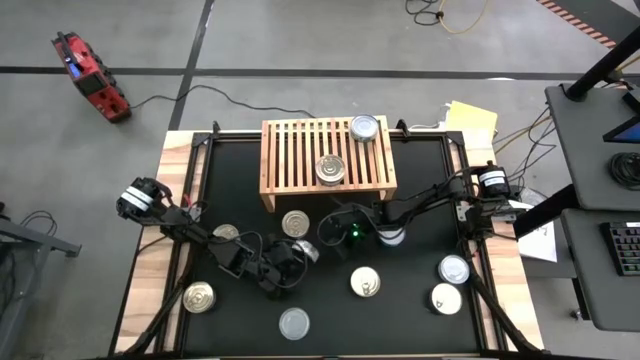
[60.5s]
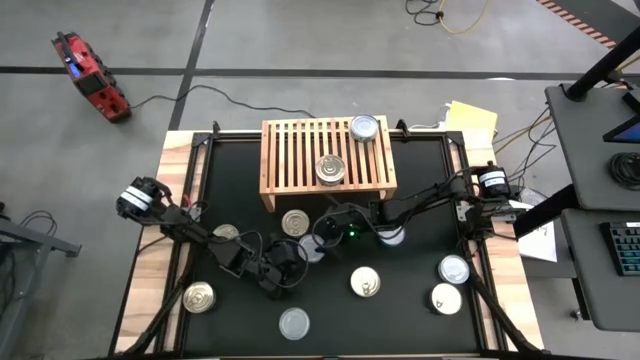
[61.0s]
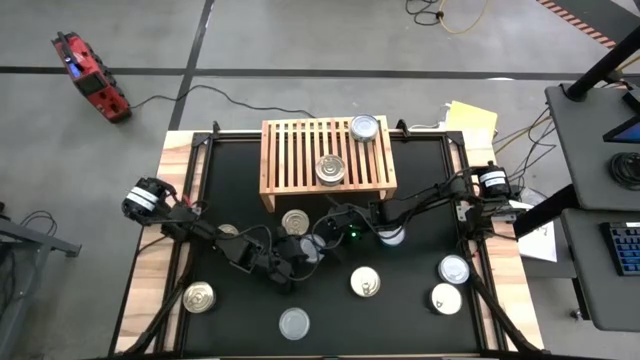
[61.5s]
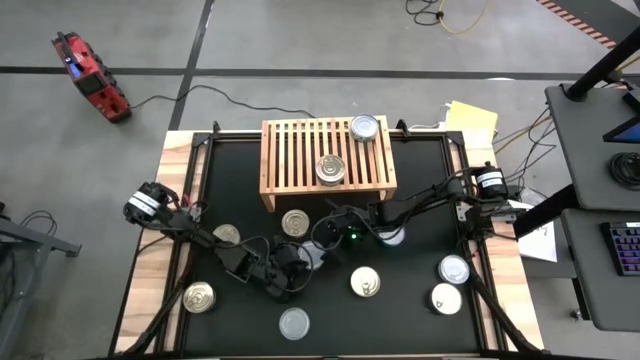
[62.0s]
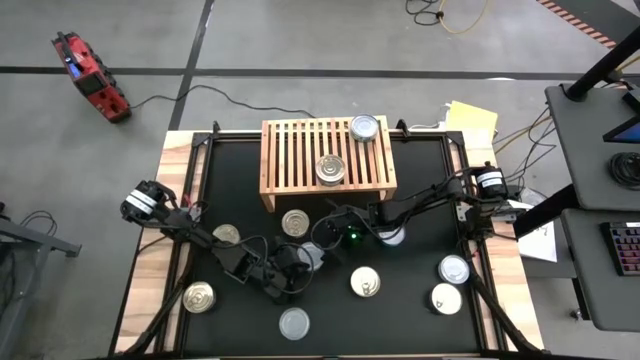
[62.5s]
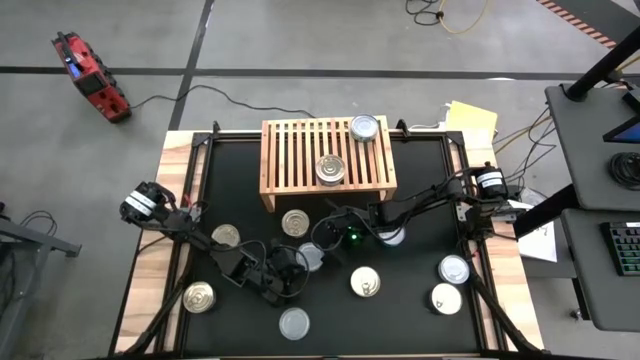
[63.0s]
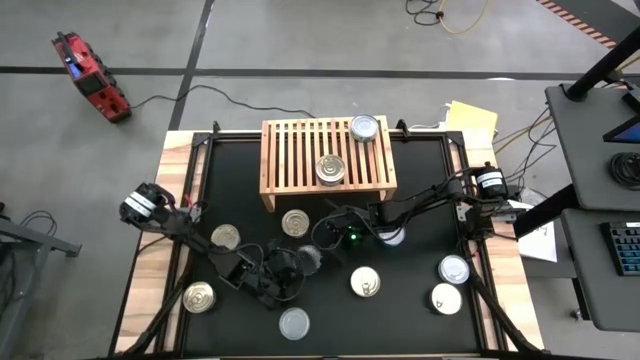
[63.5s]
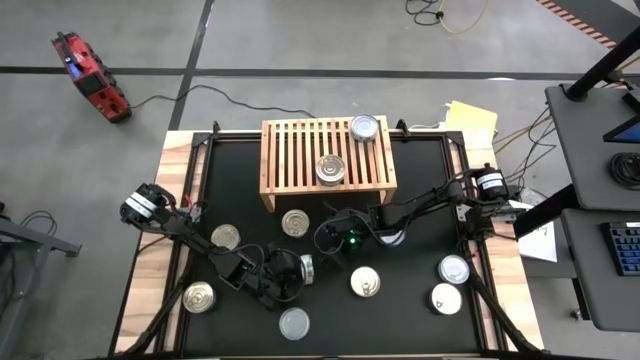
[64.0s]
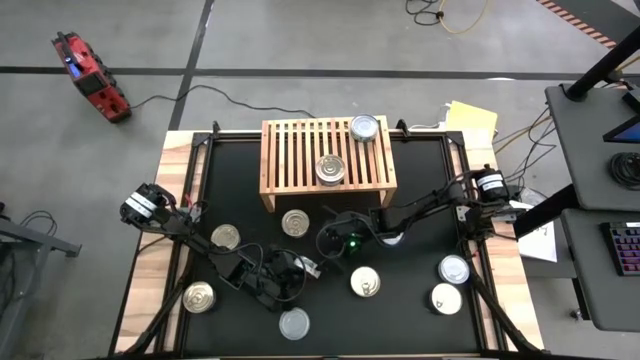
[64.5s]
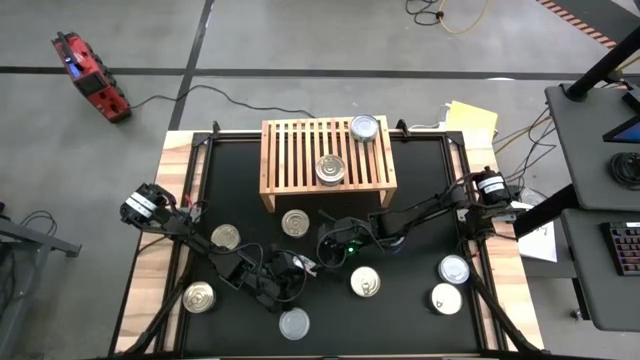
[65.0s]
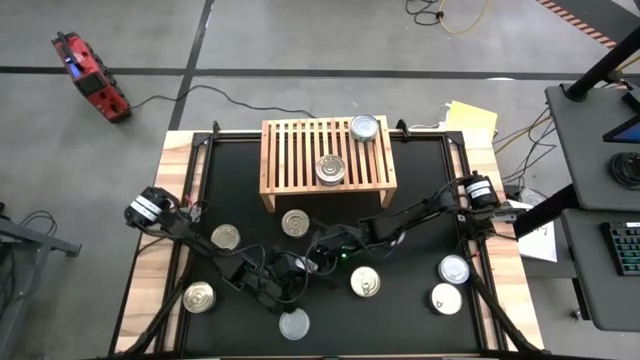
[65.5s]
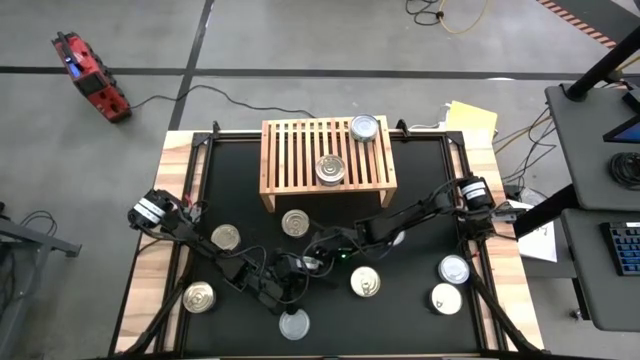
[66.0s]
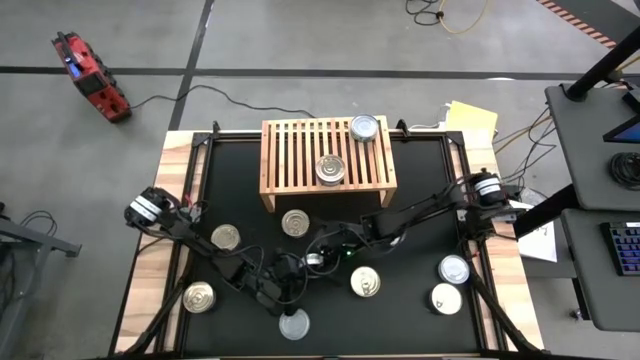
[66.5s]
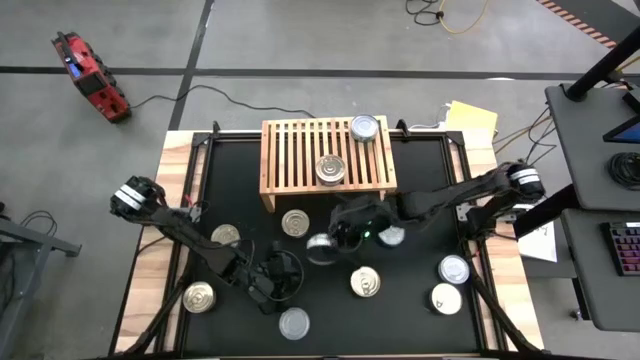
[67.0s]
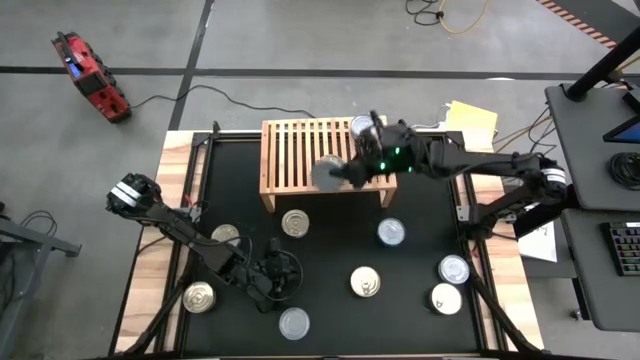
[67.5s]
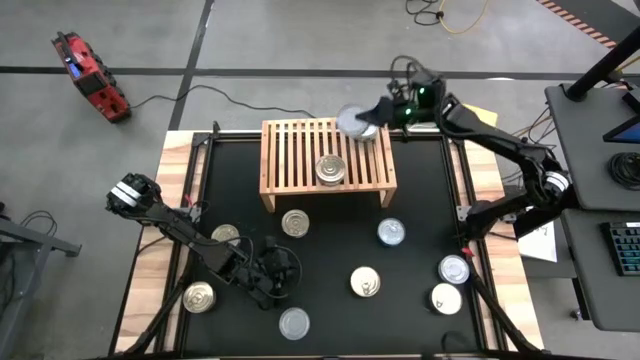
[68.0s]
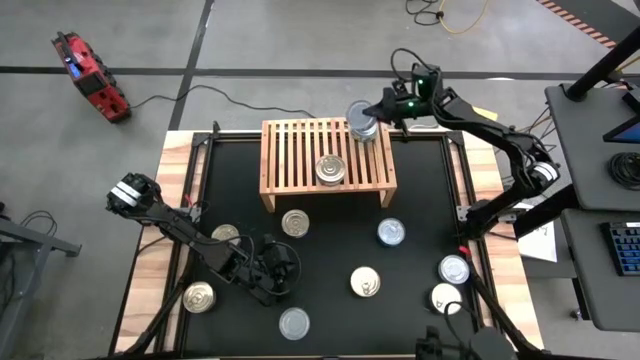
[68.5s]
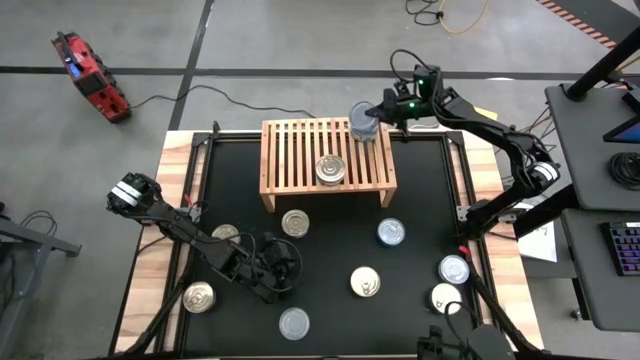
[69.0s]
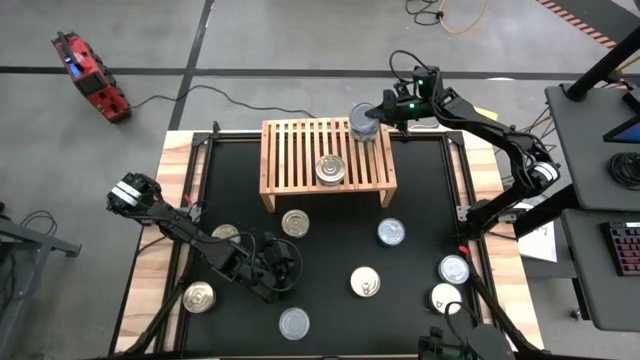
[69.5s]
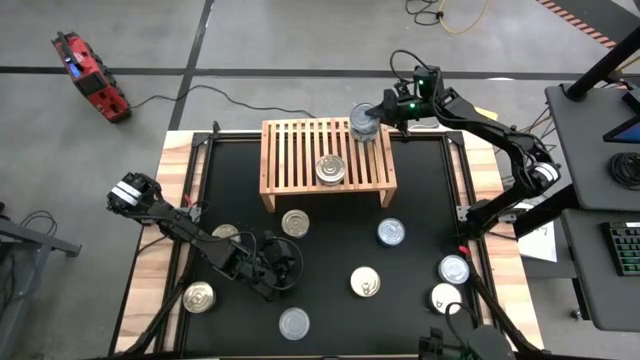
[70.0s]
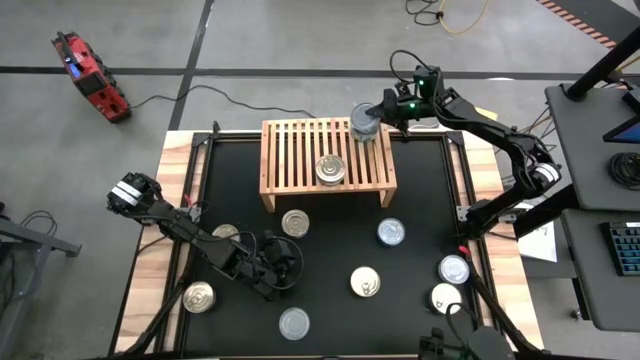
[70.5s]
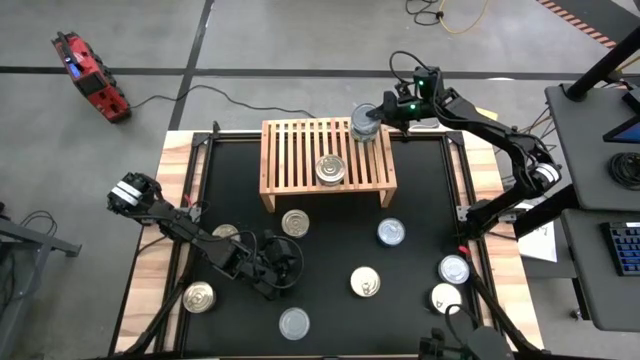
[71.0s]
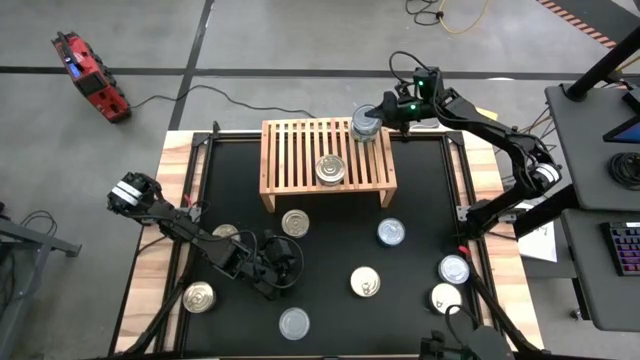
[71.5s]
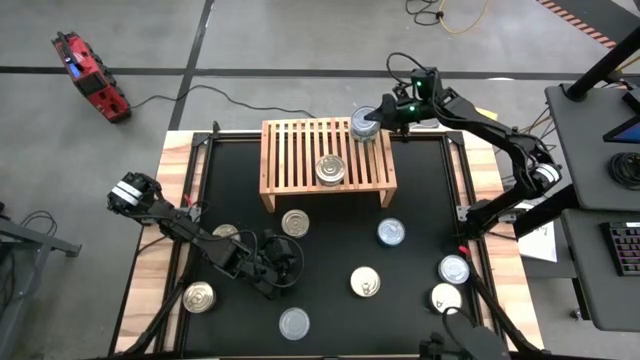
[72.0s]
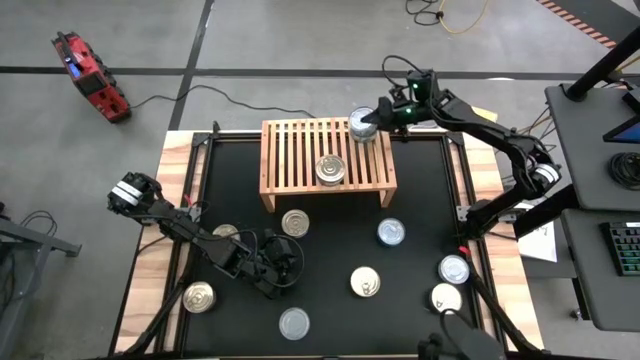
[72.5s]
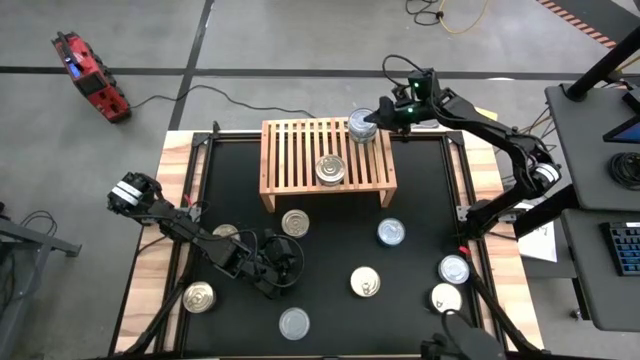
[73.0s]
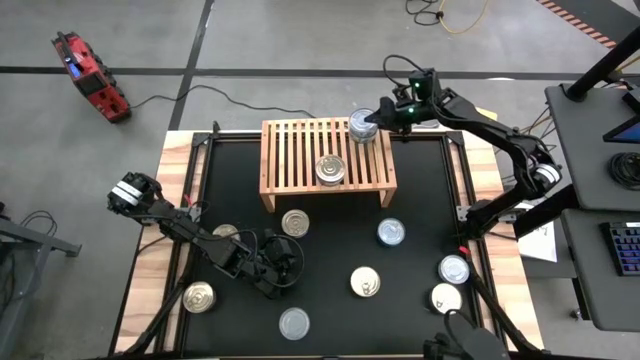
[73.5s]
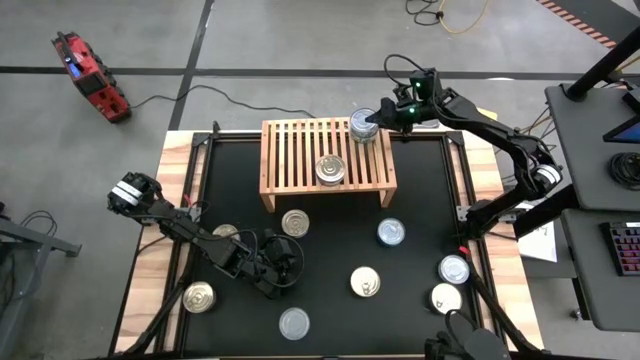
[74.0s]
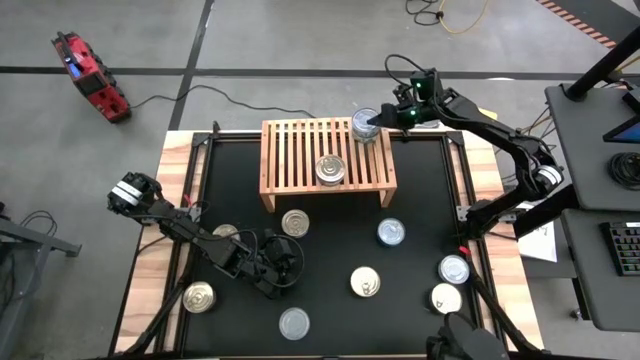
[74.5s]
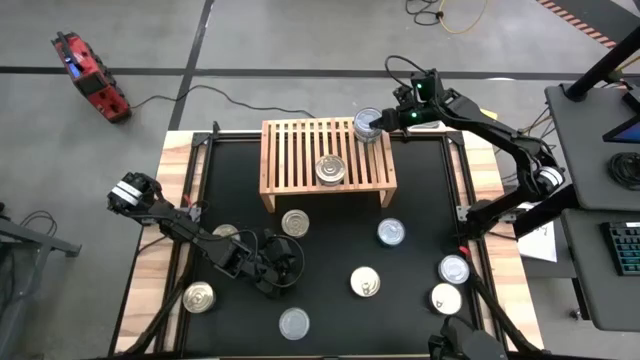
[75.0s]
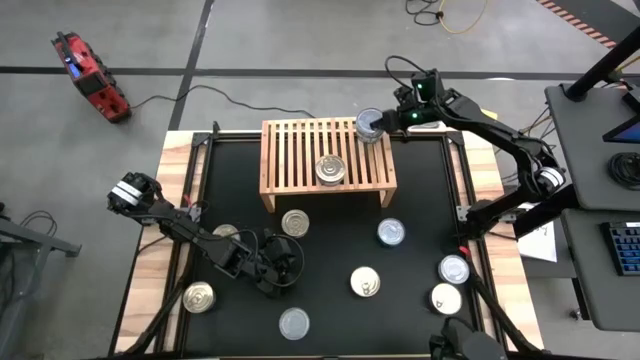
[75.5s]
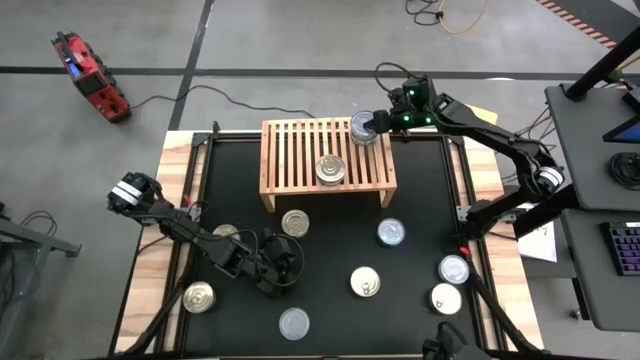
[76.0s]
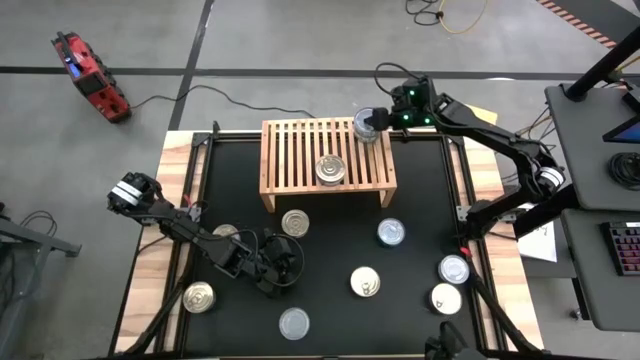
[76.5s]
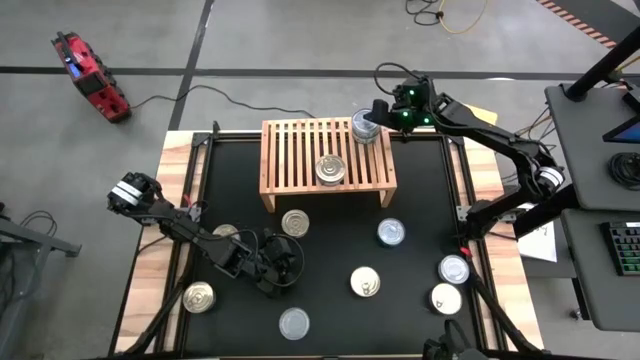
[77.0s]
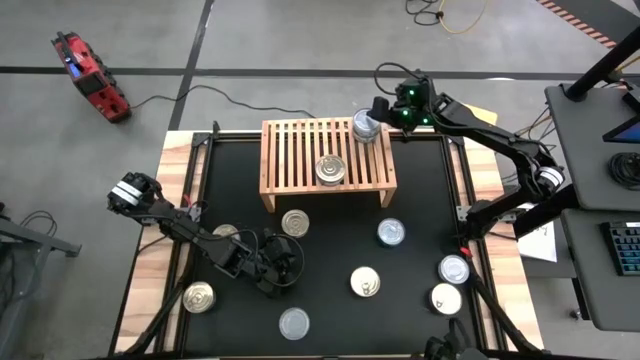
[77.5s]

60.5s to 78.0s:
Task: Stack canned seafood by type on shelf
Stack the green white tuna can on top of the green white tuna can on the shelf

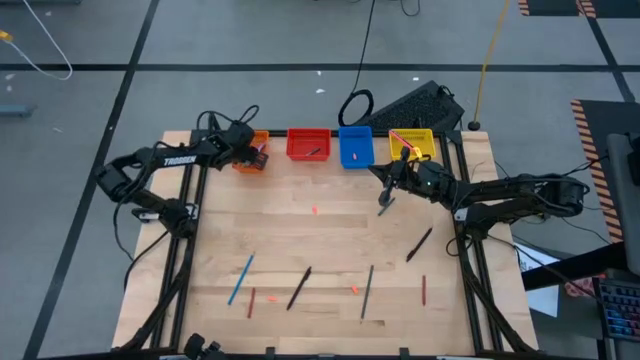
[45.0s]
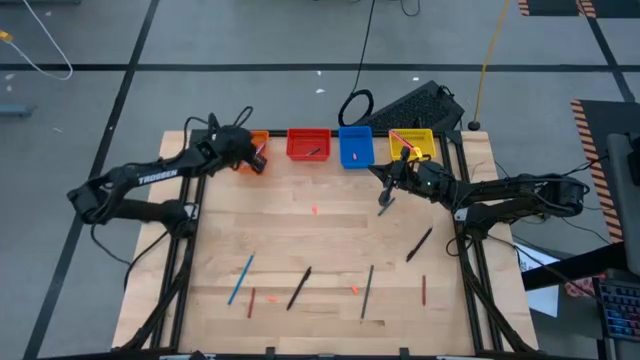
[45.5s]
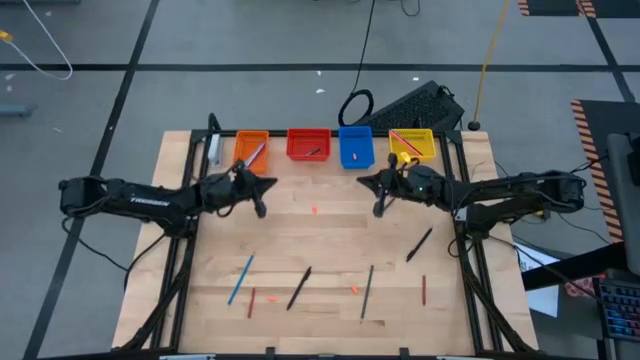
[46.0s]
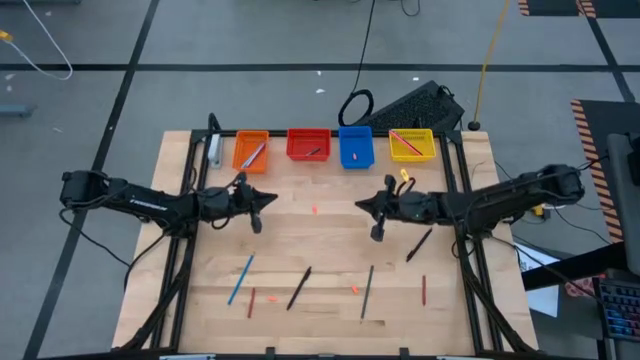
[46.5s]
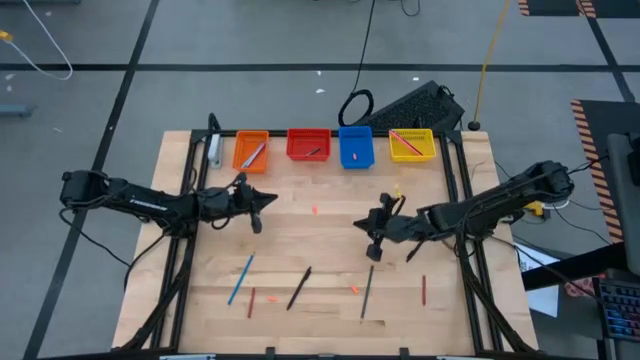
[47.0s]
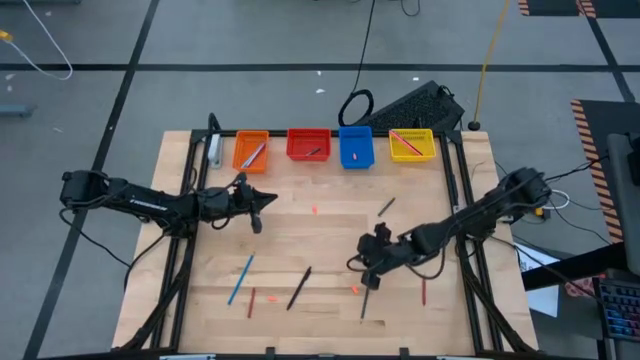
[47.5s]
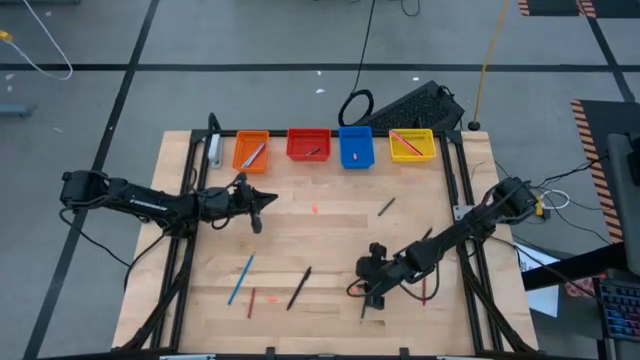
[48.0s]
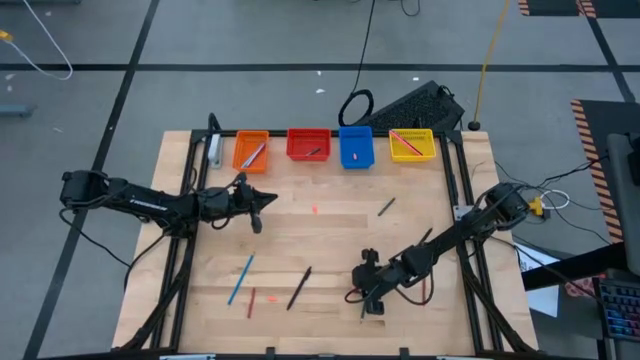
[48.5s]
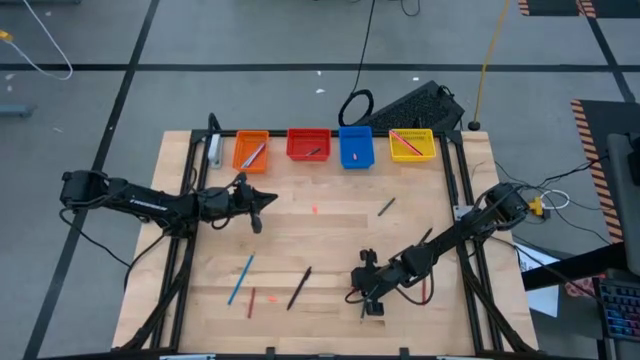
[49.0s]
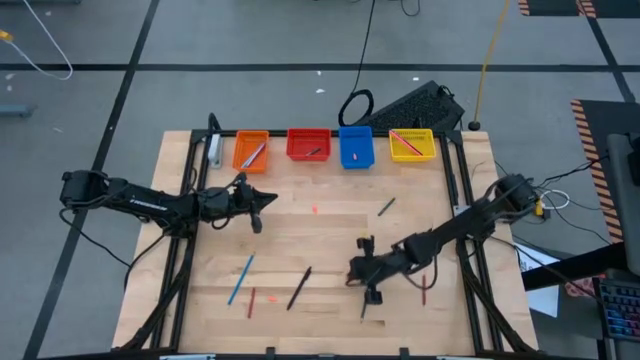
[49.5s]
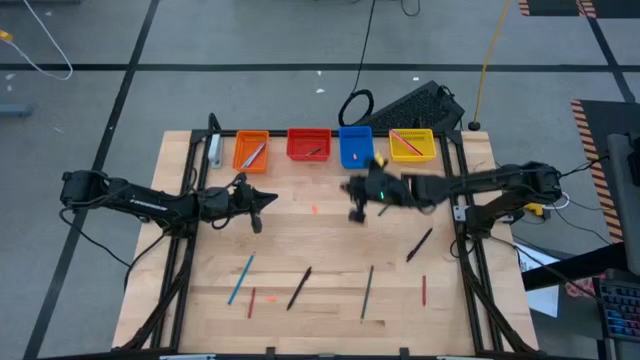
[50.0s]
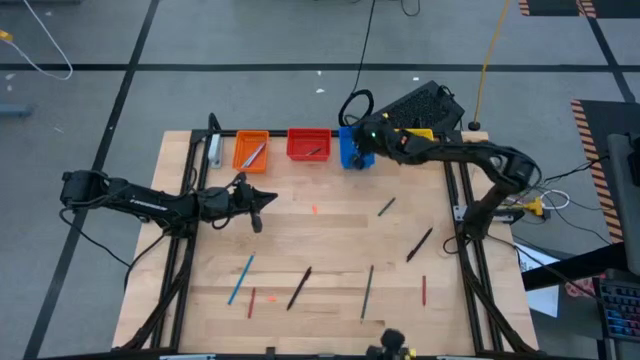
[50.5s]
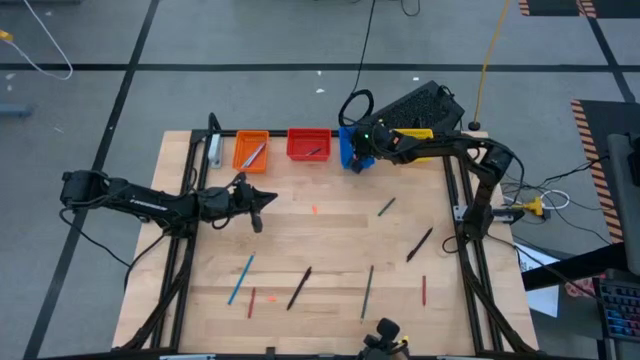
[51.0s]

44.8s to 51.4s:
Task: Sort crayons/erasers/pens/pencils in bins
Put the bottom right orange pencil eraser into the blue basket
